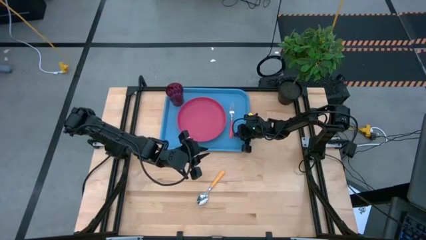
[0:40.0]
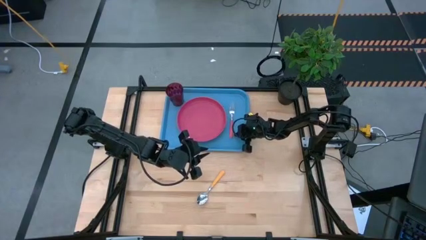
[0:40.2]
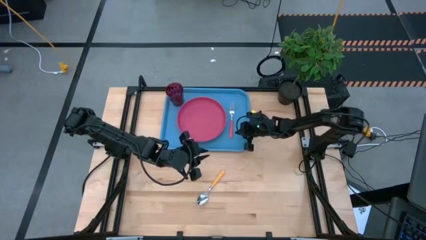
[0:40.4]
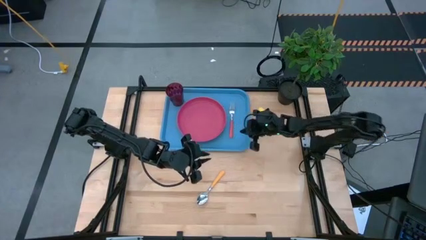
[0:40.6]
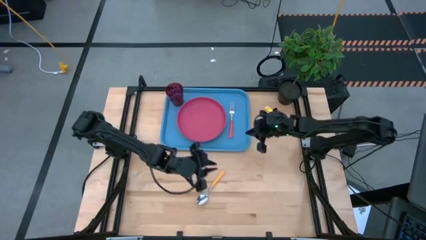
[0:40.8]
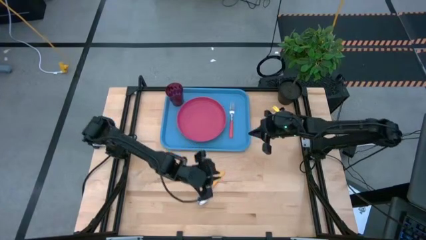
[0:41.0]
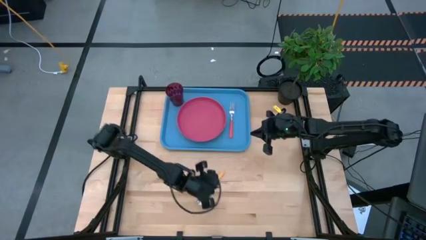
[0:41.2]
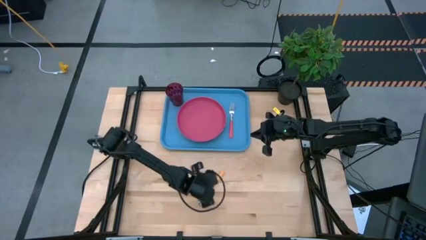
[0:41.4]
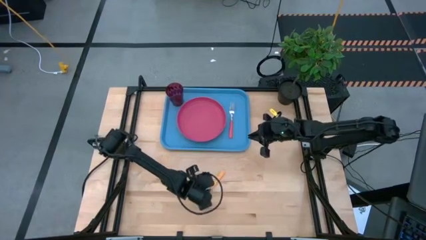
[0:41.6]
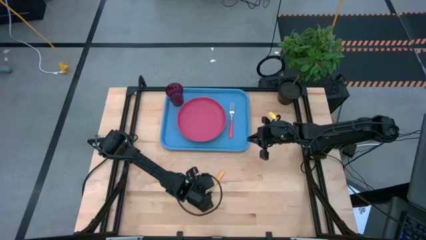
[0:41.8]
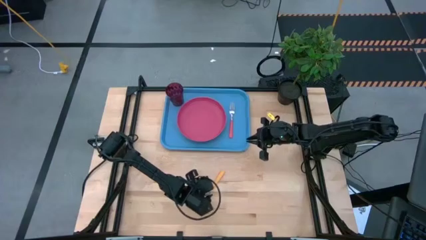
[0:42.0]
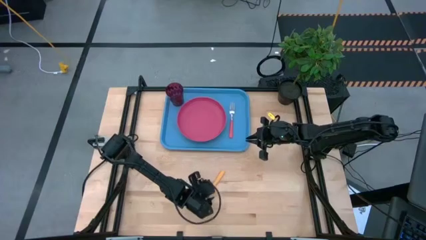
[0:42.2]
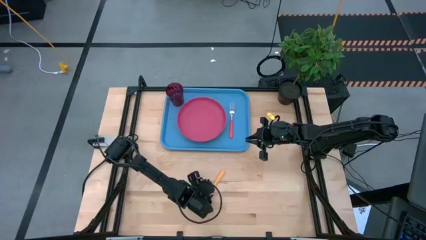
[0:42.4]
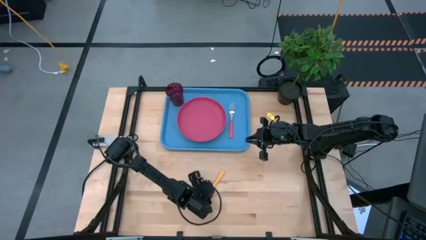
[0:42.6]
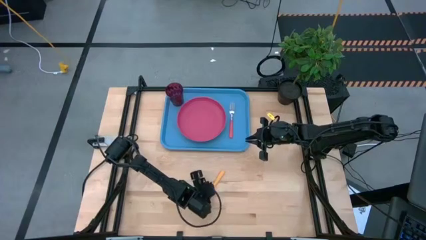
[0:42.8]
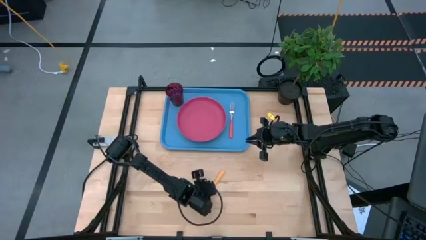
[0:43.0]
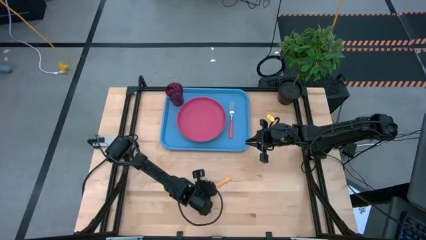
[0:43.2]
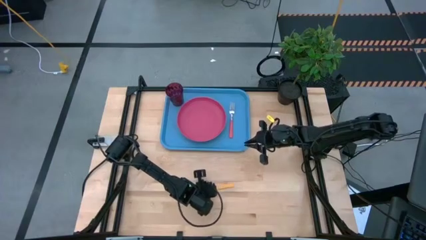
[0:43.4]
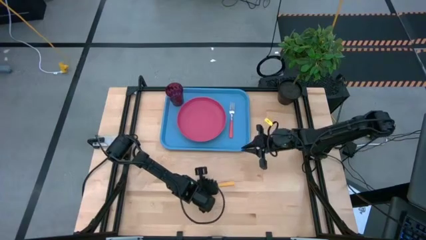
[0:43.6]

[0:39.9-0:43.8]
Task: Pick and place plate/cup/fork/spoon on tray
Put the yellow spoon on the blue tray to the right of the pink fork

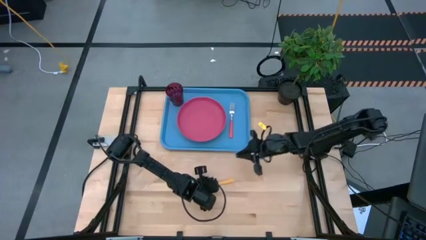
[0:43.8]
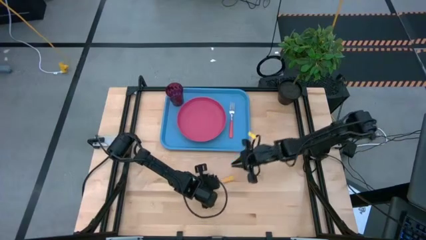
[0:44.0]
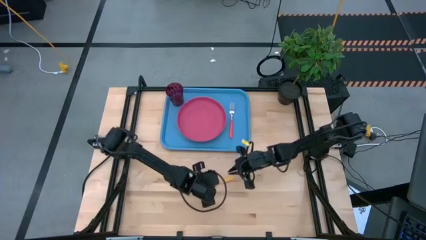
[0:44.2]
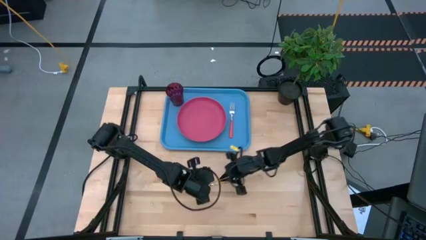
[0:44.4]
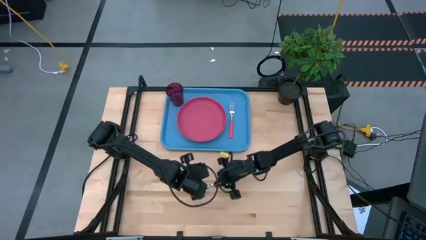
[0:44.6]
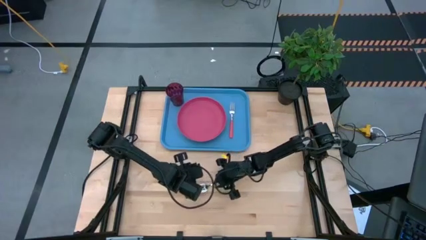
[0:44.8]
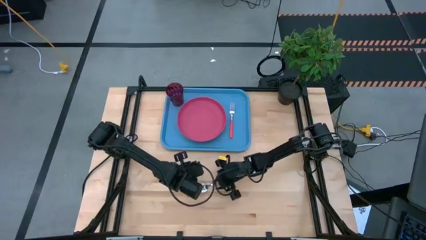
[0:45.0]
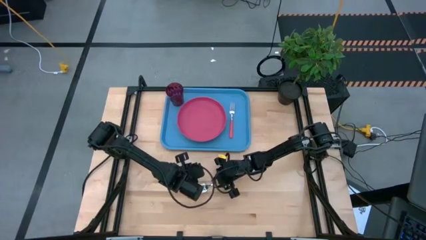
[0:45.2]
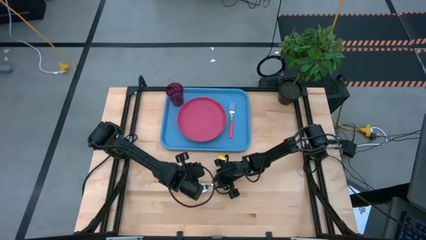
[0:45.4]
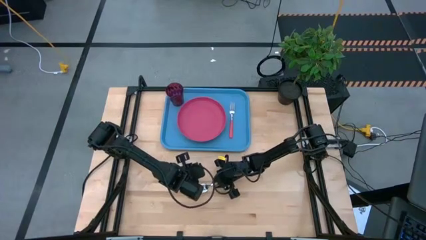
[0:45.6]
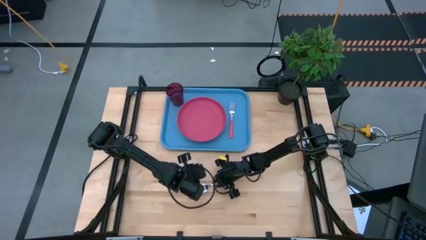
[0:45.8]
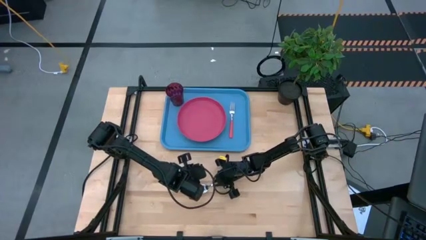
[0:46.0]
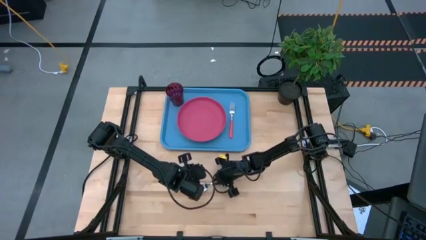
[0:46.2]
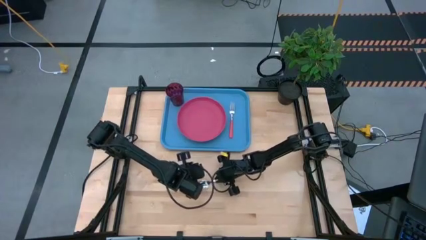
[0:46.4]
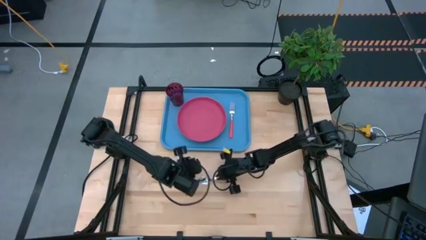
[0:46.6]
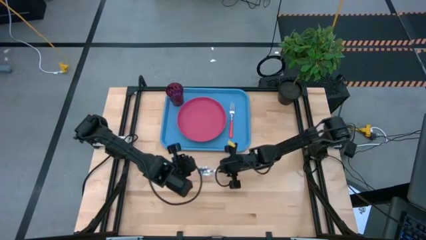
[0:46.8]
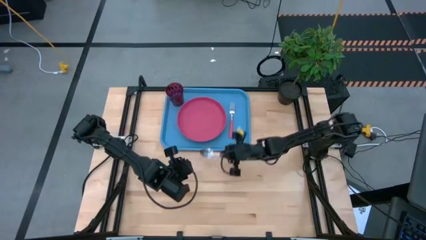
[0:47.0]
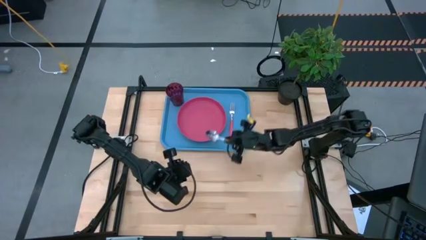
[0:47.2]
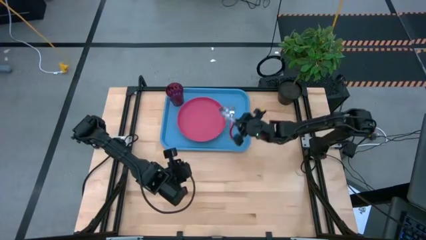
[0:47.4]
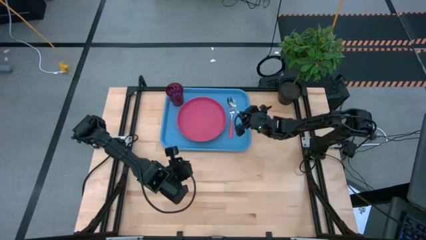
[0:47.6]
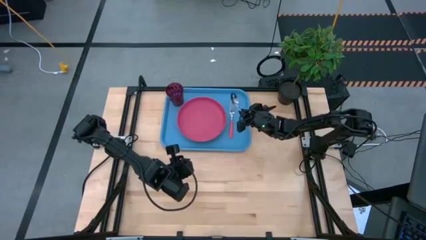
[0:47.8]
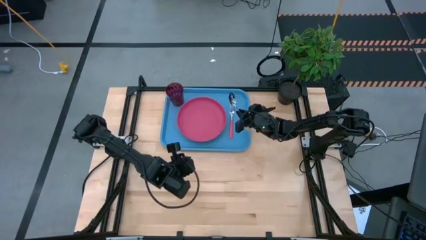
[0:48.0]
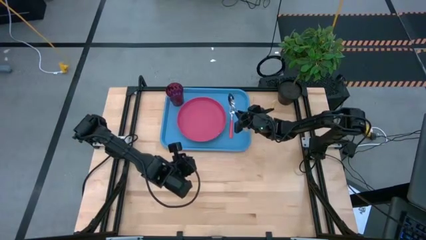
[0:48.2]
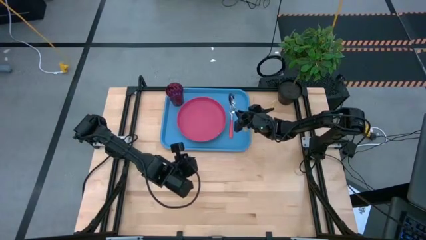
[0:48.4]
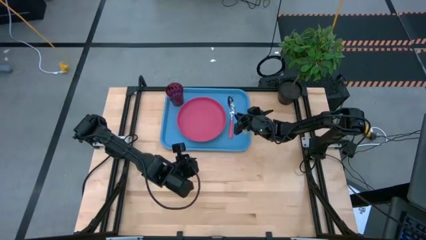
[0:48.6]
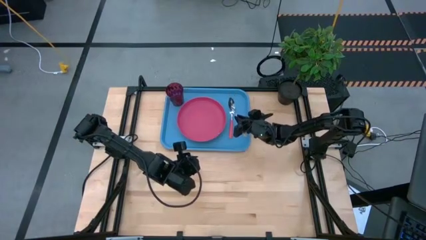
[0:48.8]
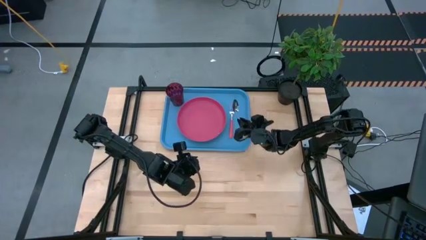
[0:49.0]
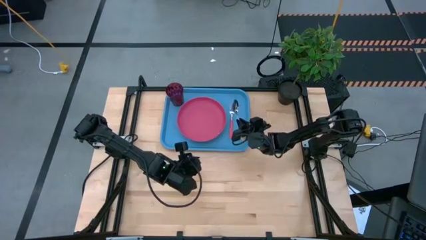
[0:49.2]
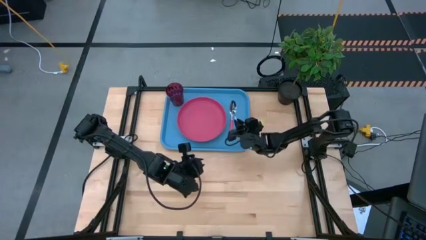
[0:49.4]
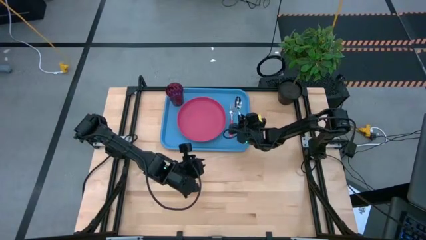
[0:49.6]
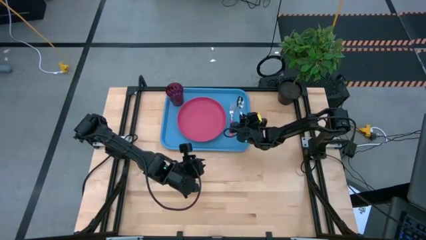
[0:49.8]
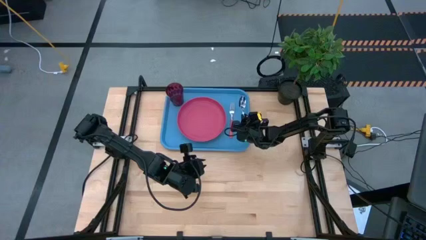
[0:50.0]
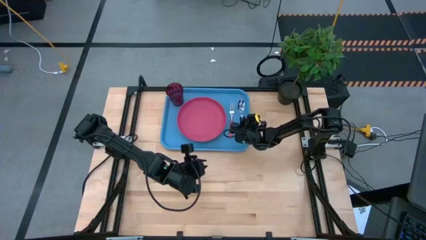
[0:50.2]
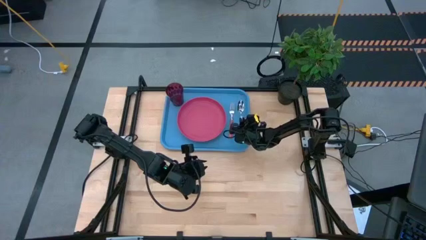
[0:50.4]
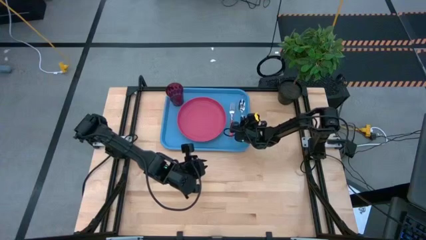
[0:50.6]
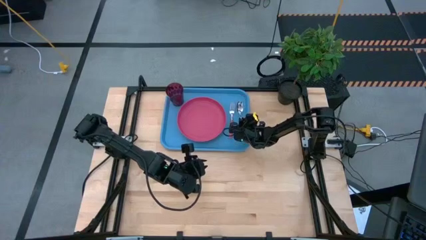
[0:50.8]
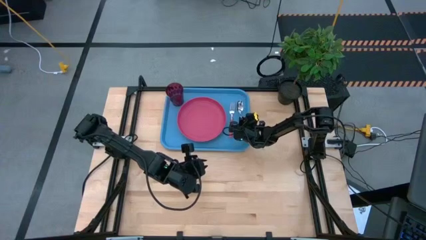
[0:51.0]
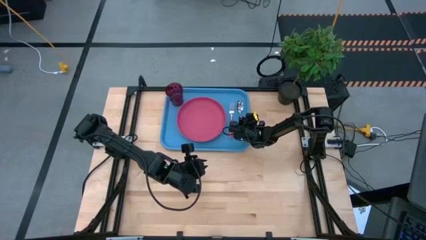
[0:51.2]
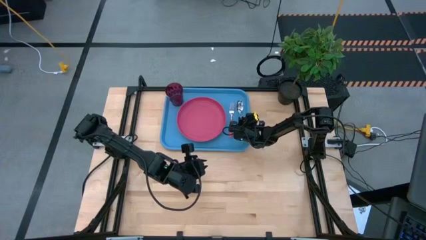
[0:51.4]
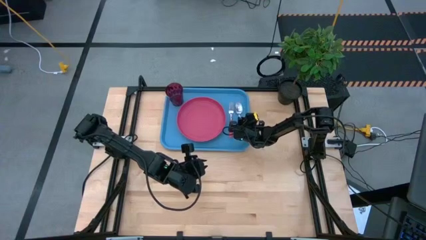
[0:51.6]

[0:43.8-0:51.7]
Put the yellow spoon on the blue tray to the right of the pink fork

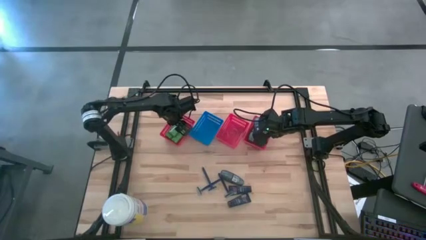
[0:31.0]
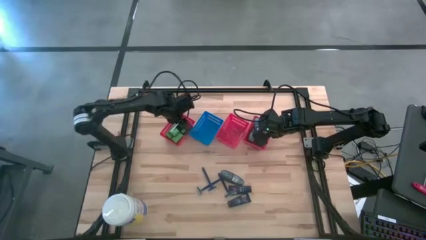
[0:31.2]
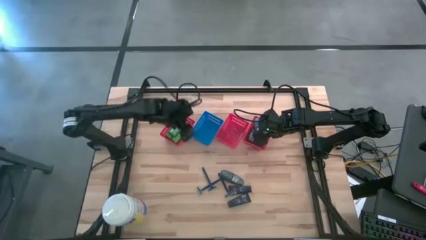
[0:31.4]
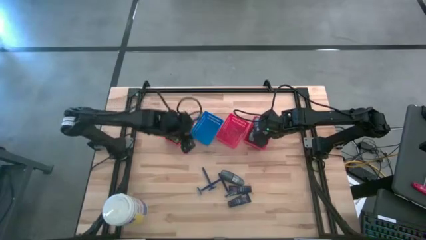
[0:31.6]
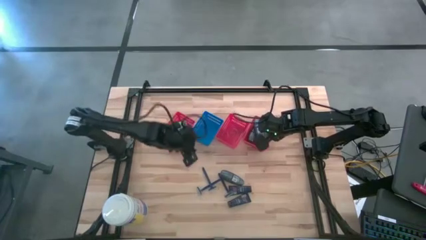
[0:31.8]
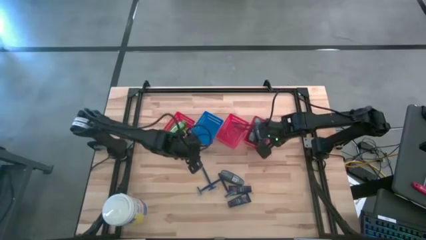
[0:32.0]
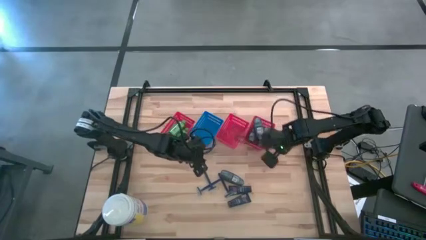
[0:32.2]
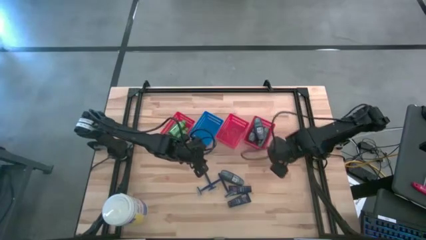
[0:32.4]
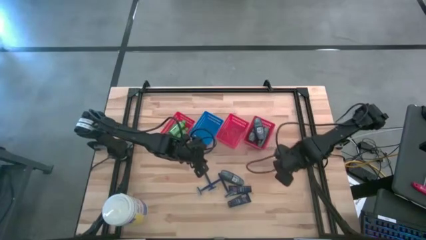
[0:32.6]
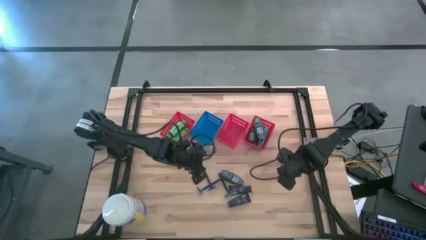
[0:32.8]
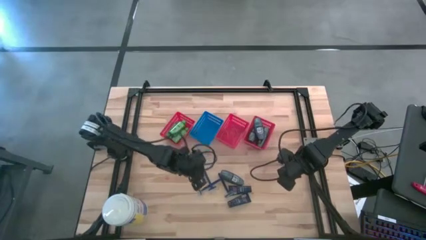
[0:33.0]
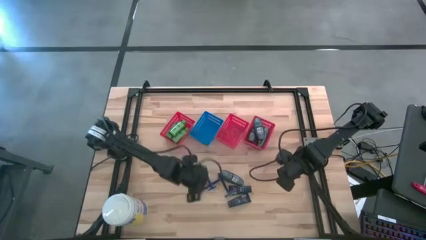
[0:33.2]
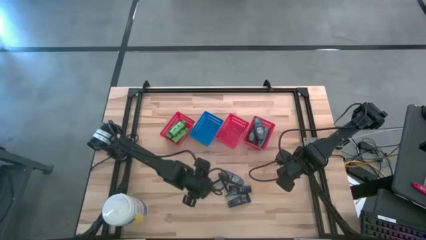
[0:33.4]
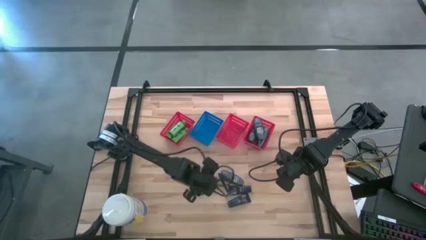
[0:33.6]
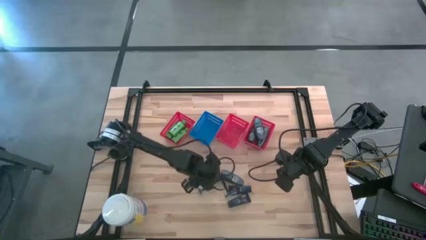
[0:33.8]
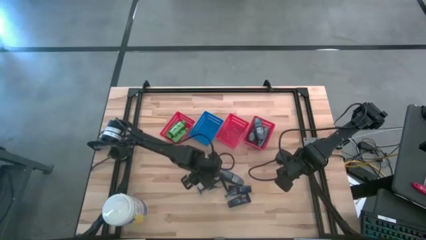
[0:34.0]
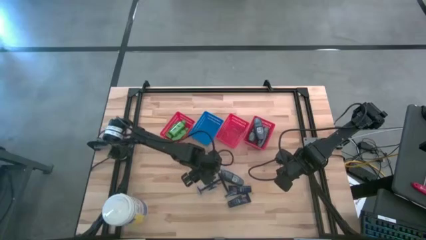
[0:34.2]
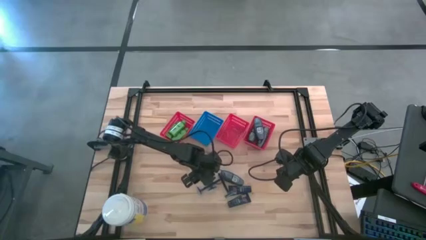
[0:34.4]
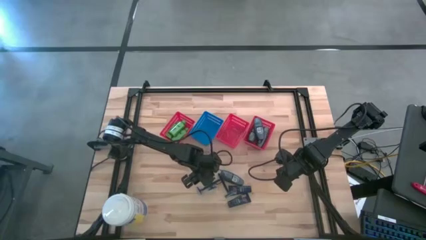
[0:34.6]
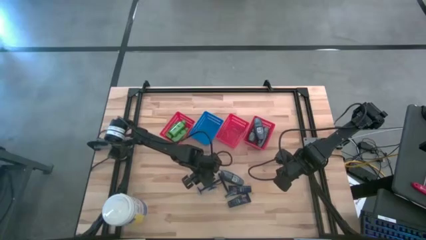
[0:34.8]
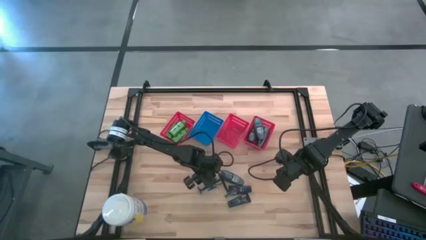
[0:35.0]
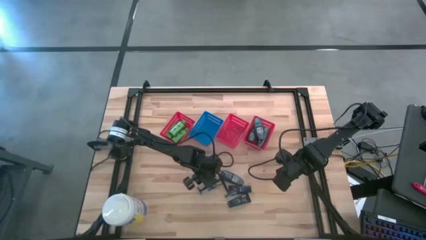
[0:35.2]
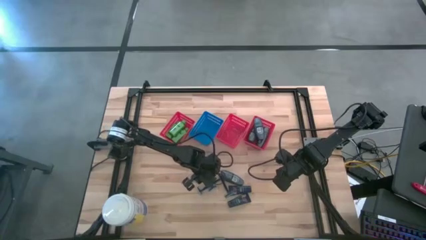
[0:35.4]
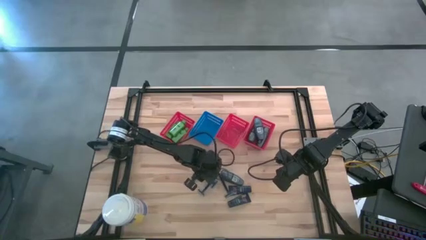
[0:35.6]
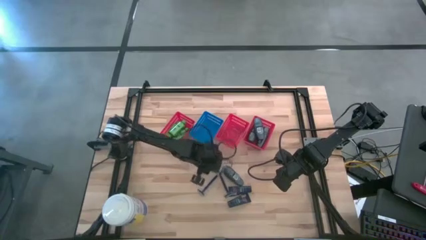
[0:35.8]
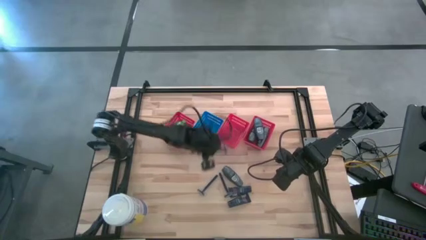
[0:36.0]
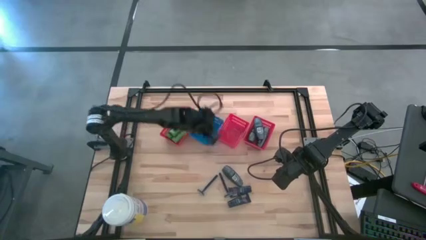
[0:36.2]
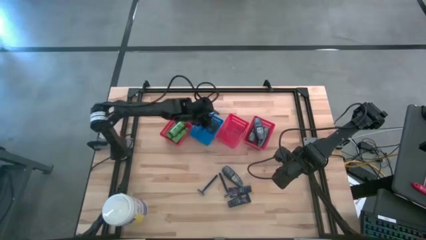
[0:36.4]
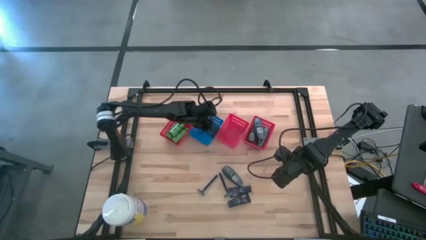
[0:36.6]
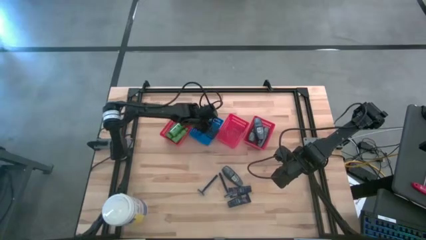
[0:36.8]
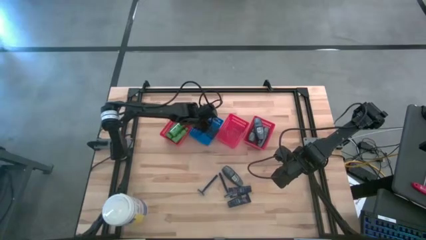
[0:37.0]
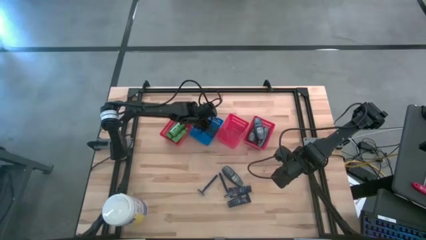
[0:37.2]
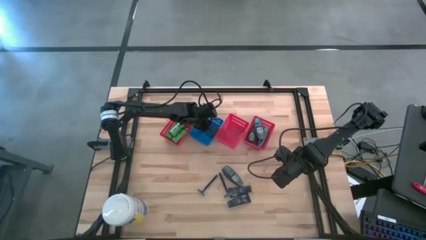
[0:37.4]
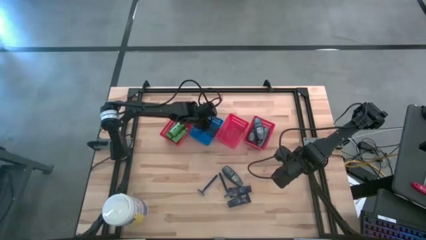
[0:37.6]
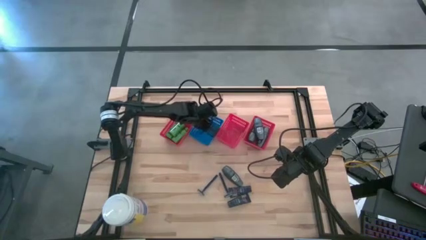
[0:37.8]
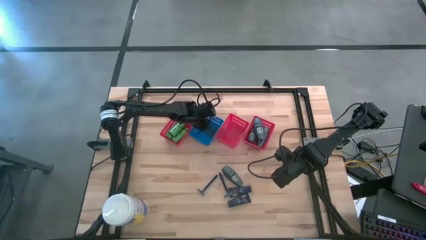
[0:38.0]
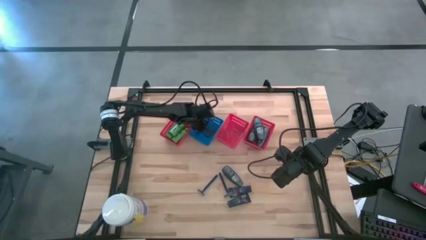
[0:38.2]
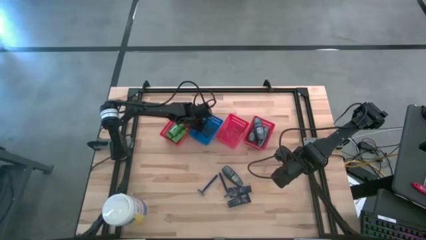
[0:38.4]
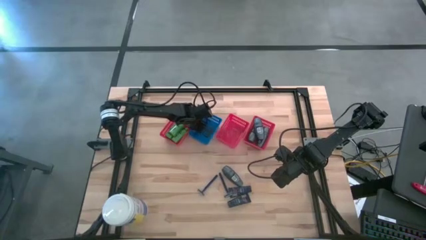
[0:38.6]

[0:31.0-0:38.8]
Task: Pick & Place Travel size toiletries
Put the blue razor into the blue bin
